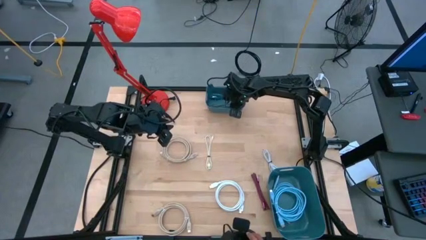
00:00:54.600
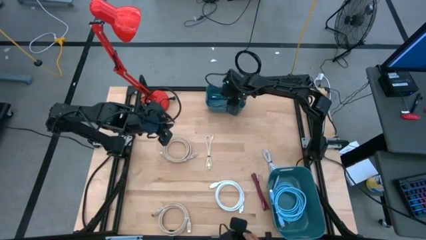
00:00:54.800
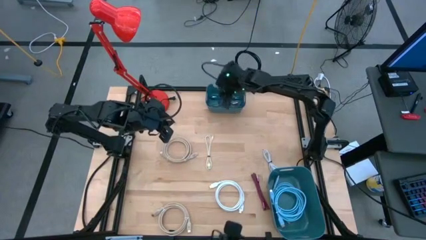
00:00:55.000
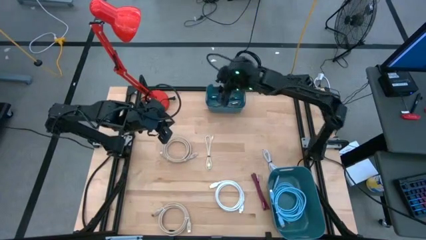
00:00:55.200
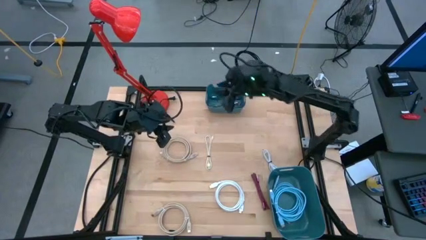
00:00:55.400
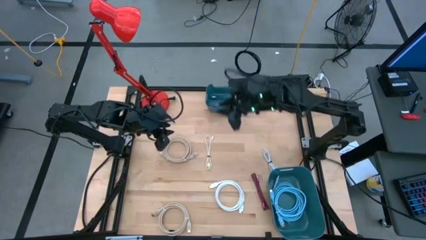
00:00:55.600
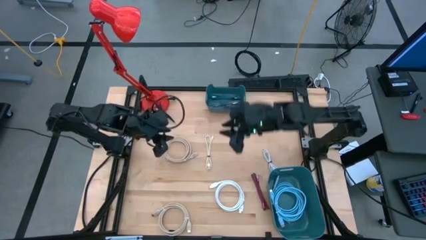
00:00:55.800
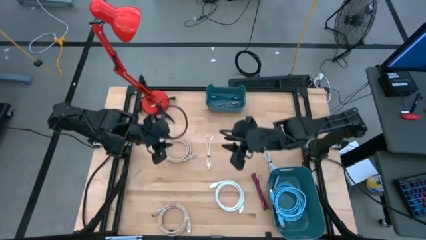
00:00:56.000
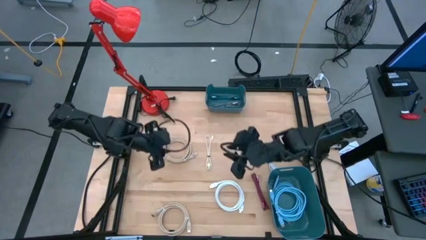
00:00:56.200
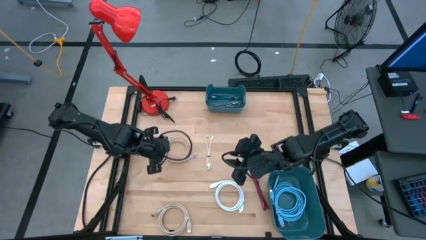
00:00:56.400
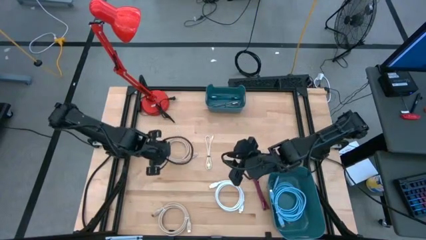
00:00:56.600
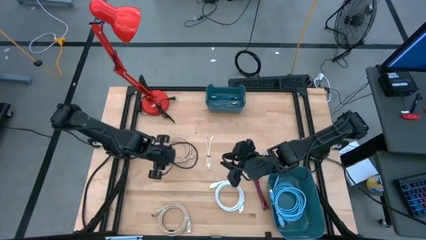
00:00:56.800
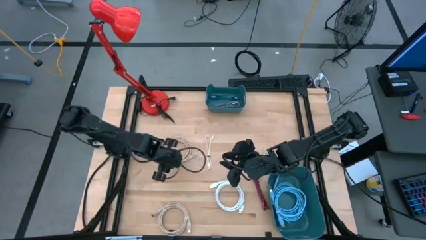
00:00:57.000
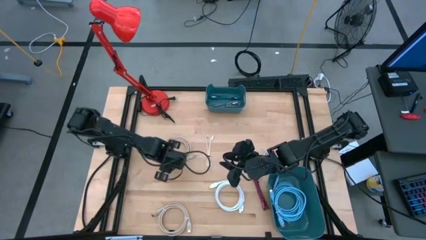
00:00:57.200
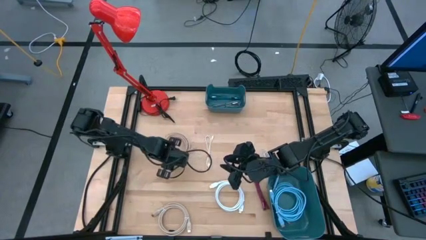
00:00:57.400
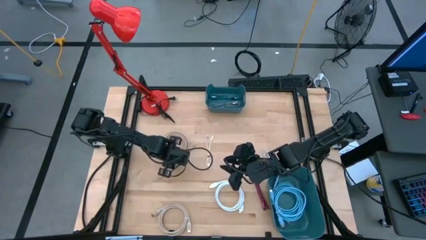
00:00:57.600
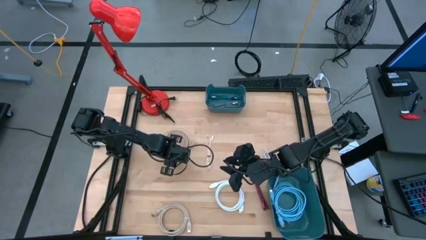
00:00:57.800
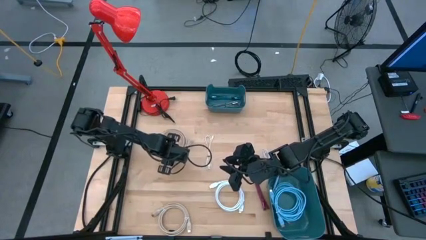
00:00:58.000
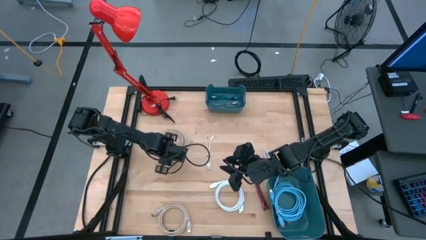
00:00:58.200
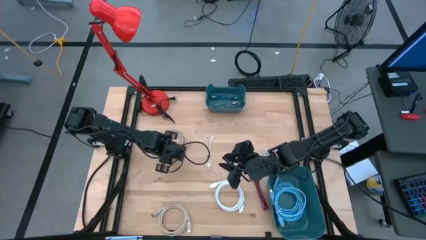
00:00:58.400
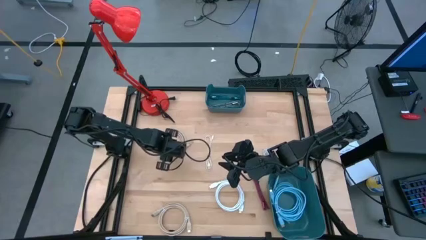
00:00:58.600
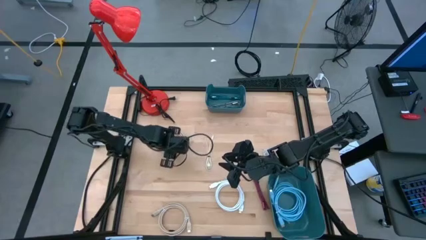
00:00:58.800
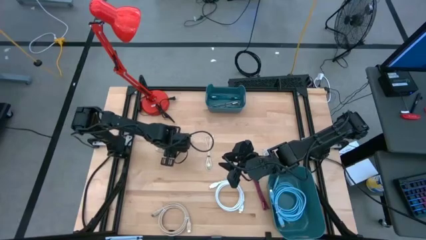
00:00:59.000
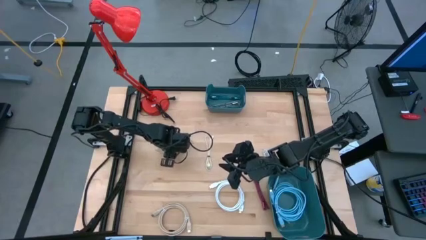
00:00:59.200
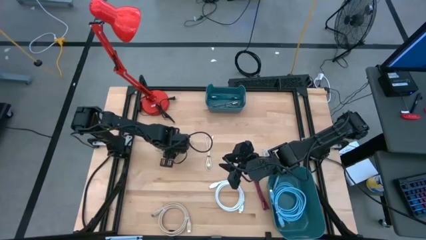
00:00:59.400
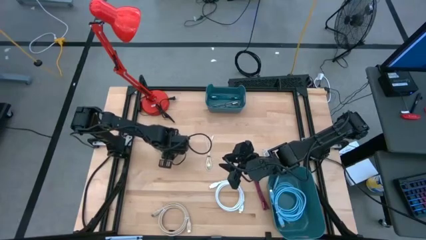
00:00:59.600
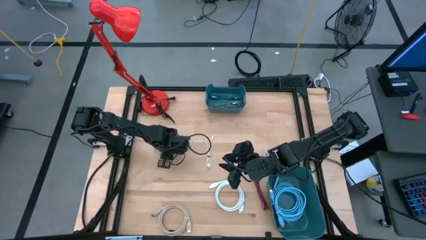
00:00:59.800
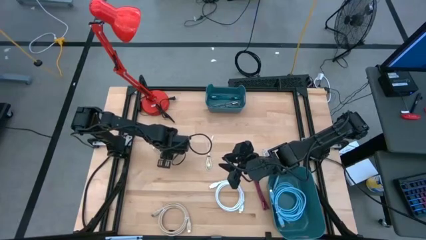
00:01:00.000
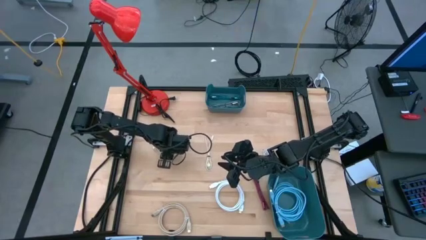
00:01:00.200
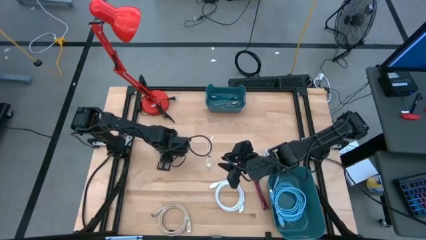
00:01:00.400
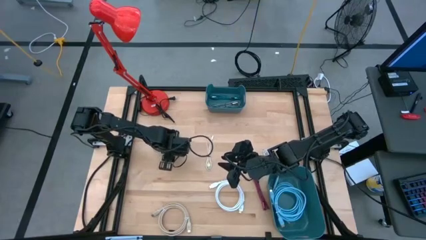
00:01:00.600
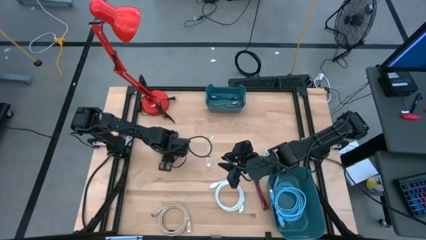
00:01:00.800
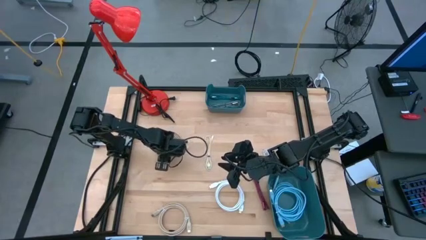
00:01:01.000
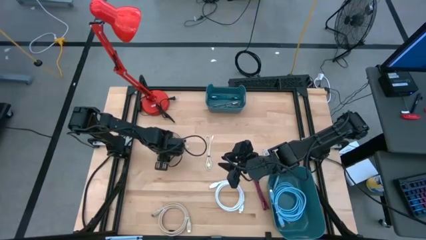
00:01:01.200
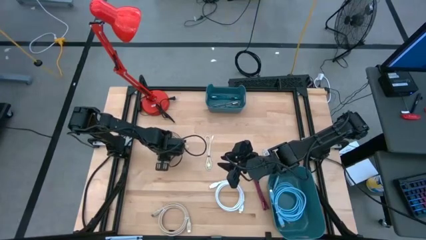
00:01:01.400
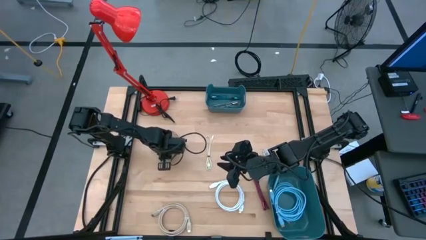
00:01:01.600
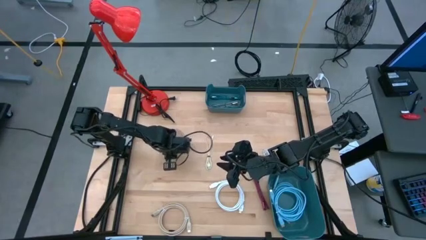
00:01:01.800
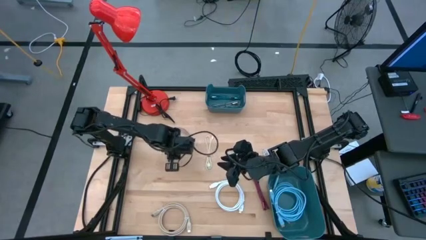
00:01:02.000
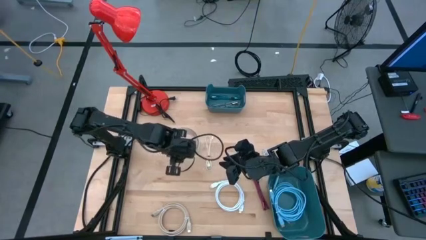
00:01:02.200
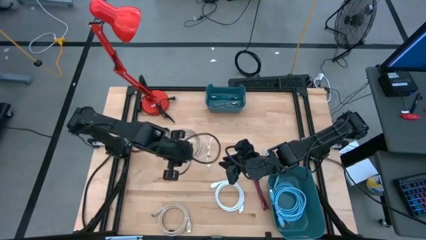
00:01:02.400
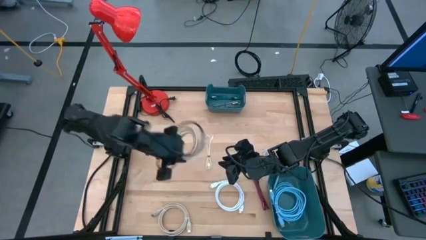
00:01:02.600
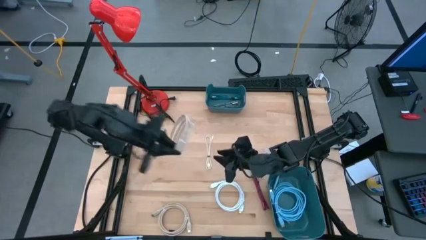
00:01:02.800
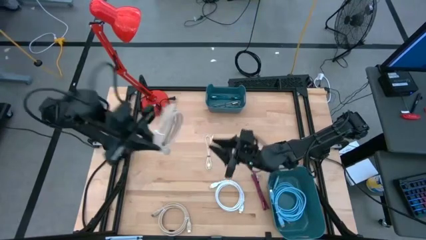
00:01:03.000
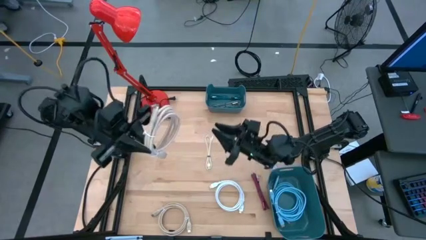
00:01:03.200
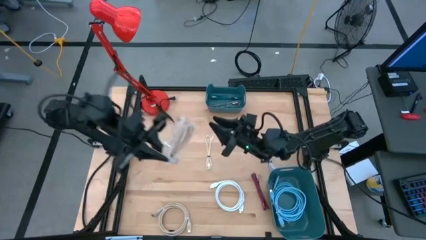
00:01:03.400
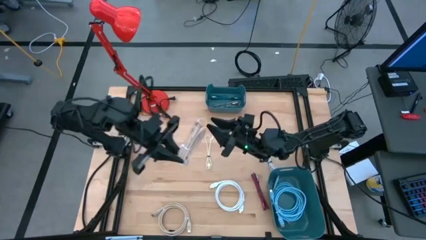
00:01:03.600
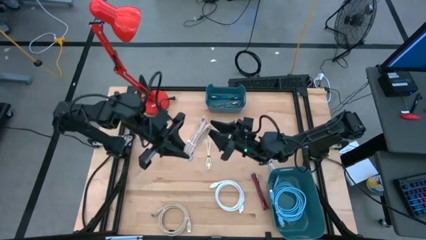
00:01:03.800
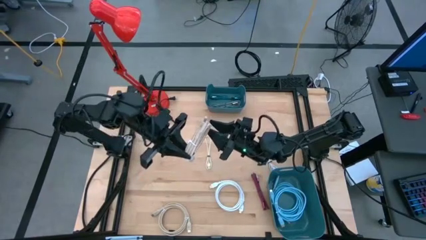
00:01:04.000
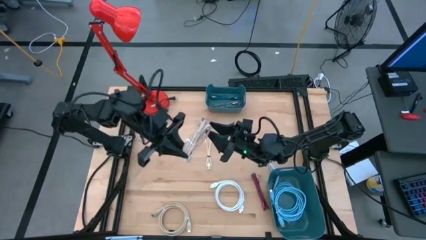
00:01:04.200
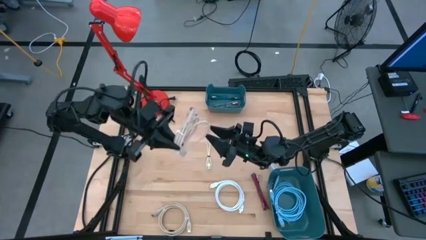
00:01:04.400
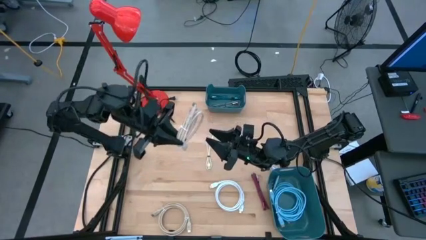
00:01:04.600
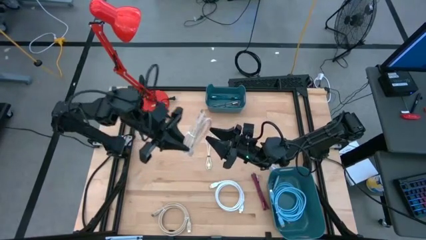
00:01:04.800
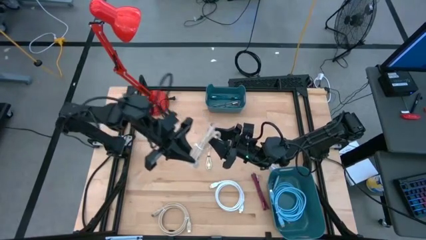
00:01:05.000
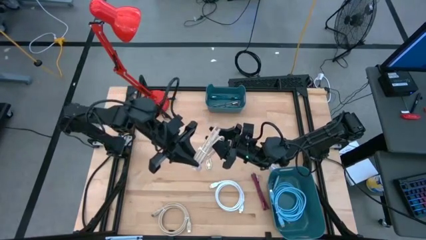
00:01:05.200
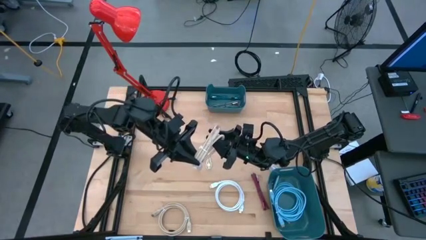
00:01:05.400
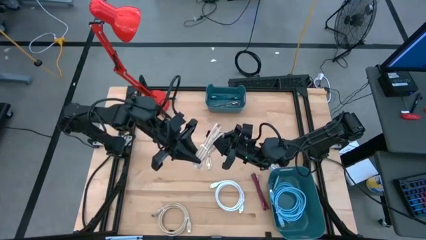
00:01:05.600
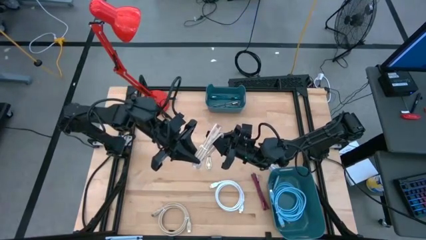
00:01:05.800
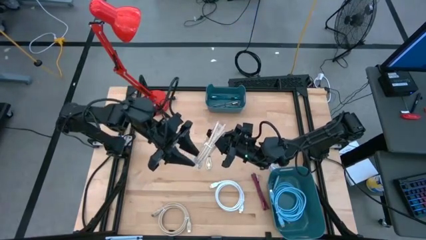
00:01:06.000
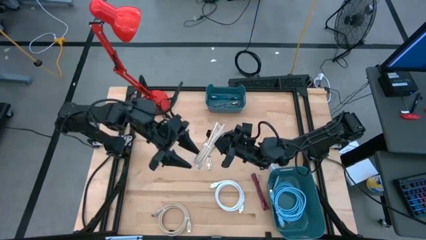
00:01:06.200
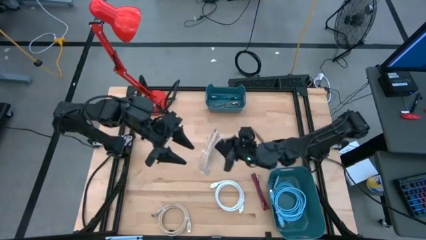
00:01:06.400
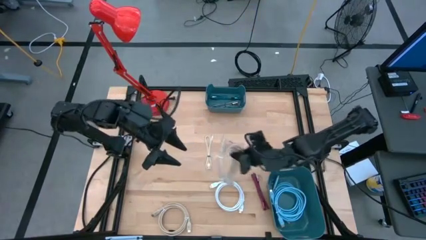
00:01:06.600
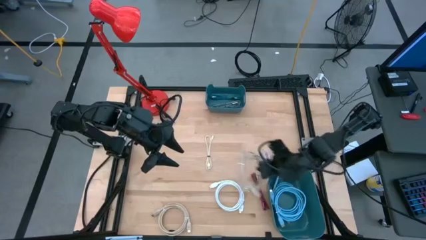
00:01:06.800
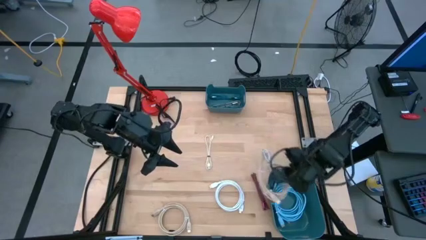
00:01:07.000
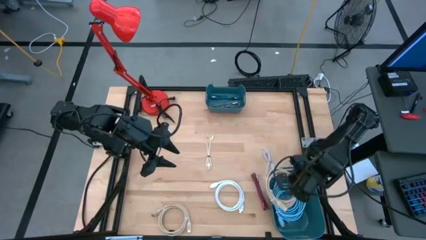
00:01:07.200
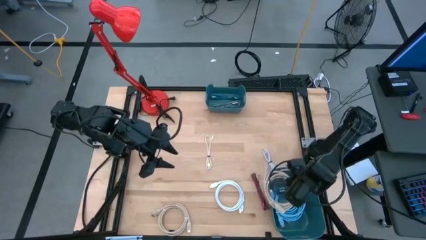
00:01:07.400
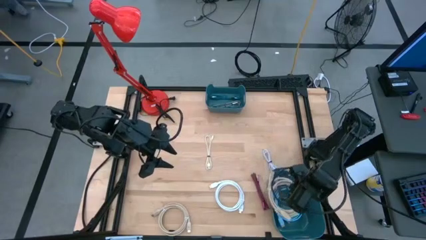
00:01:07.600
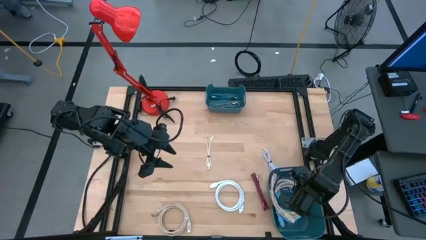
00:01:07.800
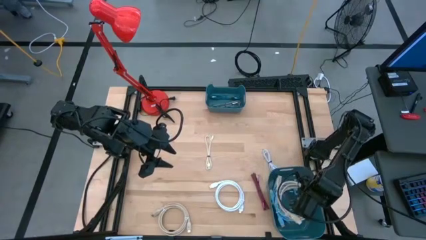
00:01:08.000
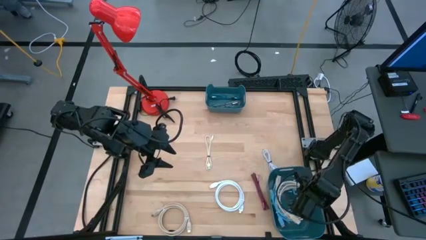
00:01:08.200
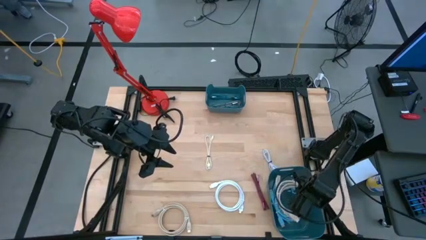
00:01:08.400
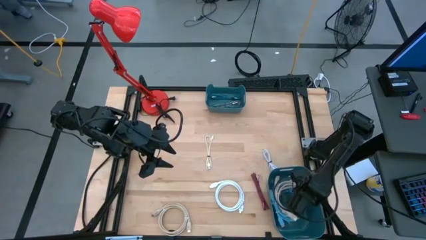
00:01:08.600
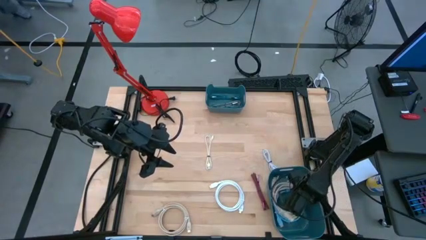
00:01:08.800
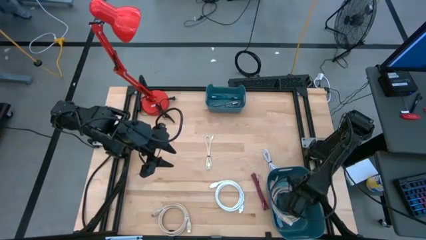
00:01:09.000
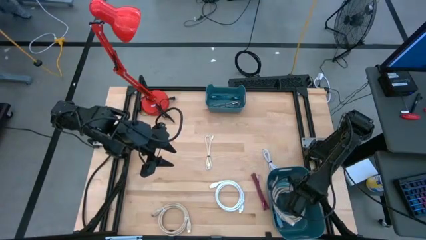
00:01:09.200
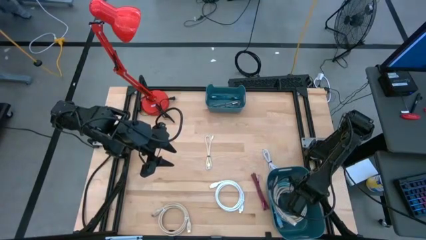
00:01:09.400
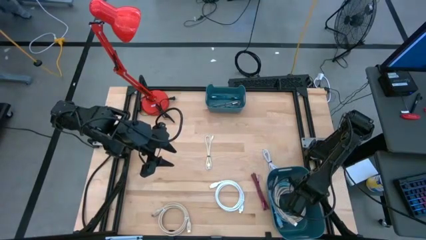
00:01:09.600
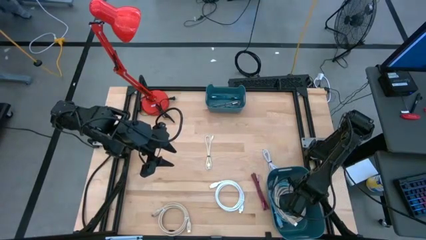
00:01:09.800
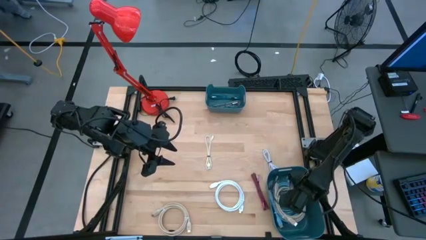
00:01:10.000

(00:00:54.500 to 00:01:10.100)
Task: Pick & Place USB Port
Put the top light brown HDMI cable into the bottom blue bin
